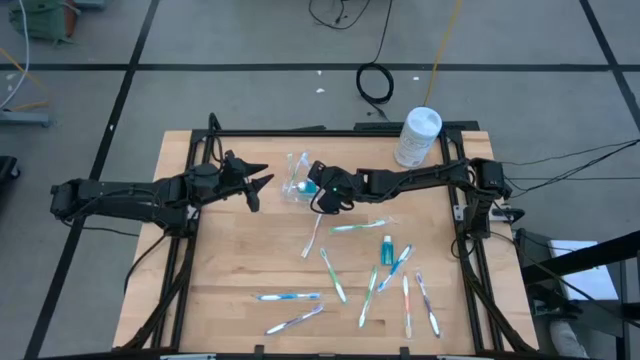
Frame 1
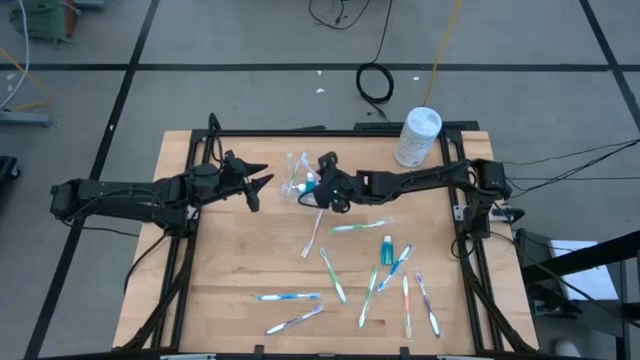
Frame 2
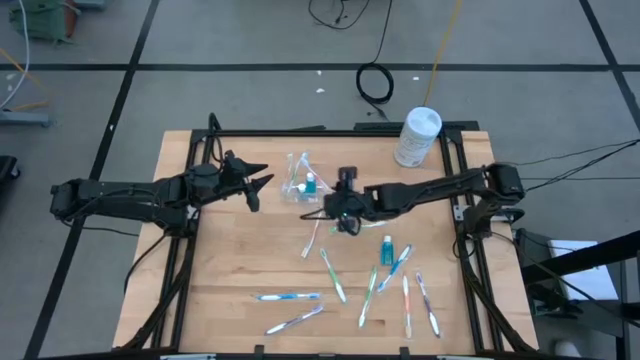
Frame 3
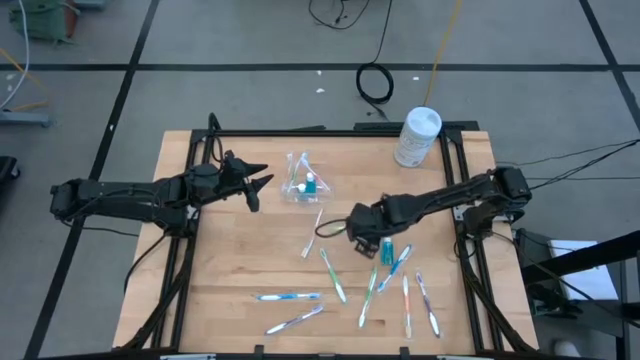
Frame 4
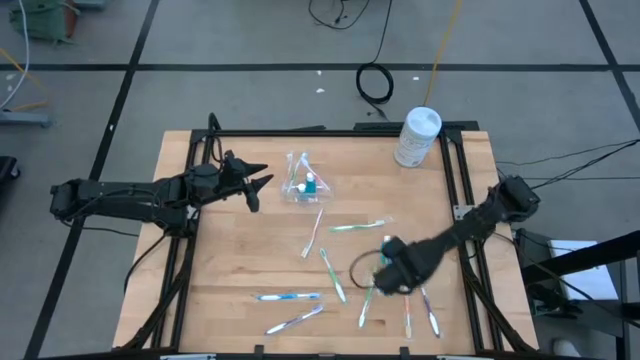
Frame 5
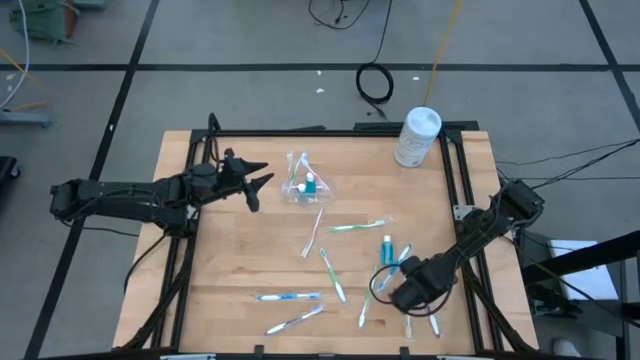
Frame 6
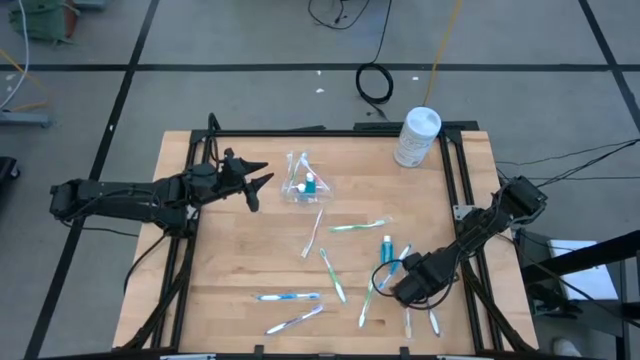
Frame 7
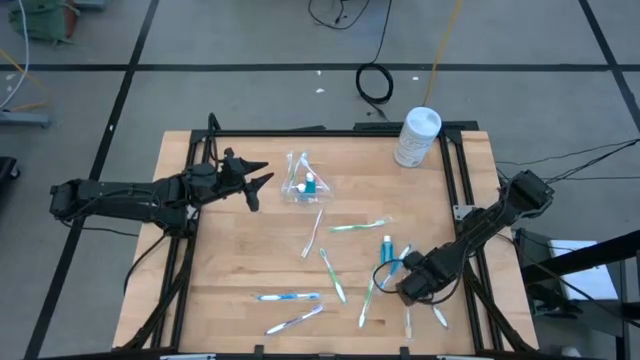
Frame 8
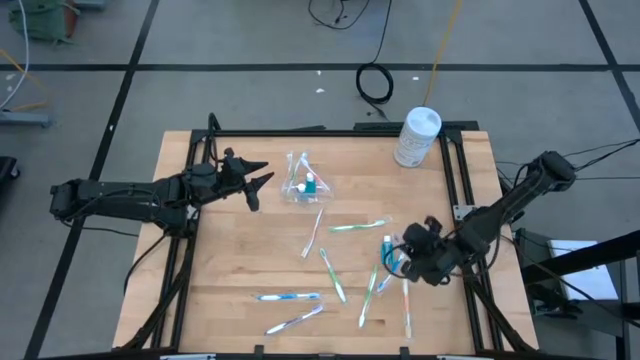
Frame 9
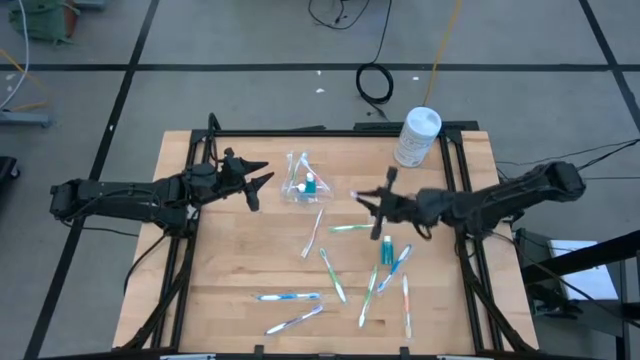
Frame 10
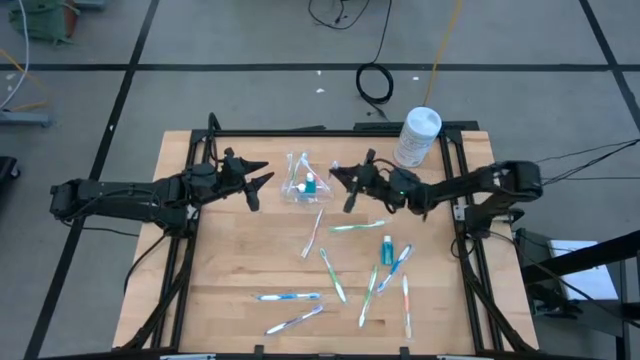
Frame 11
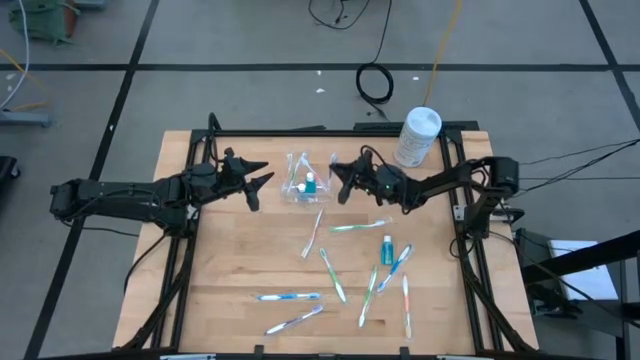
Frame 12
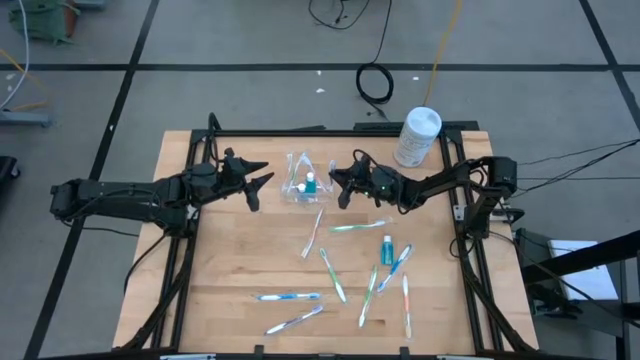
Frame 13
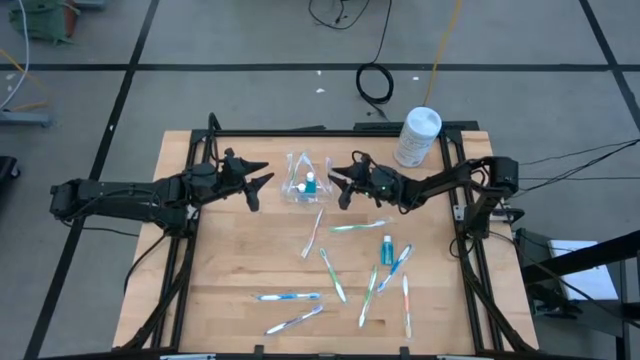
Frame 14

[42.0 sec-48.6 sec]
Task: Pick & Place toothbrushing station
Put the purple toothbrush into the transparent organizer

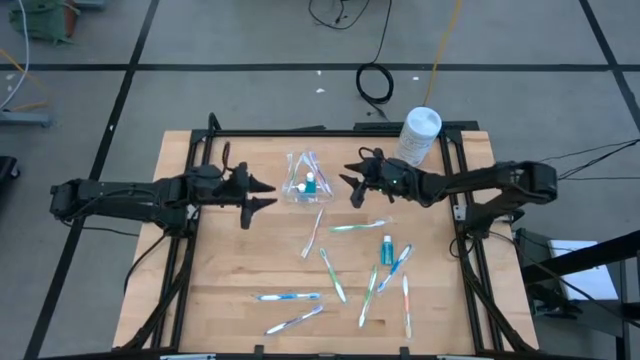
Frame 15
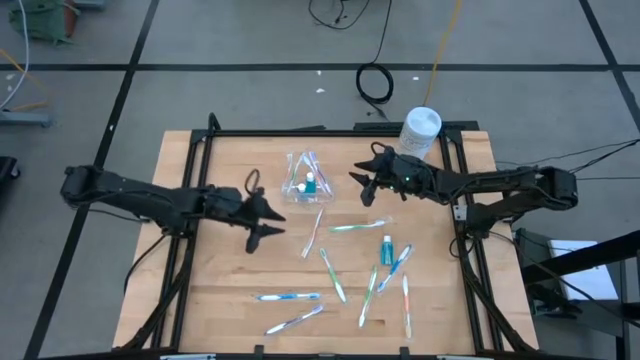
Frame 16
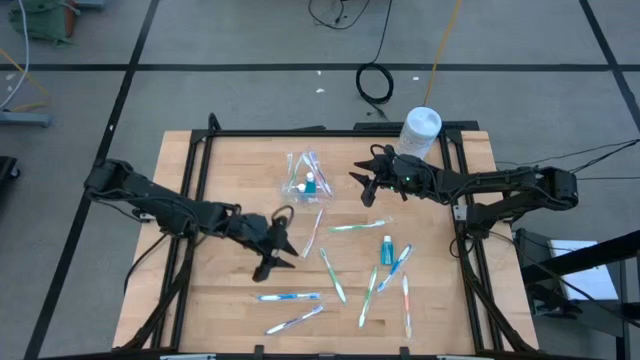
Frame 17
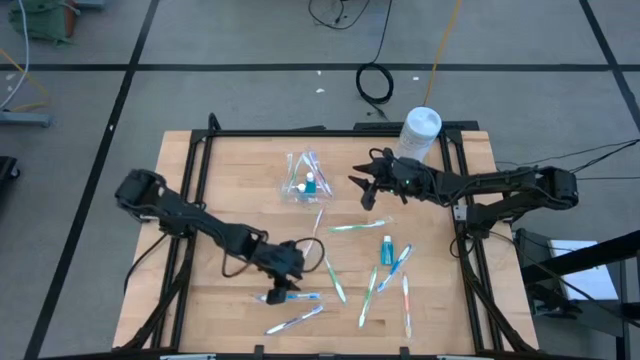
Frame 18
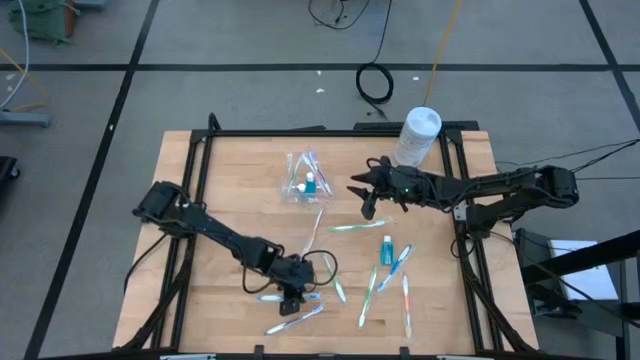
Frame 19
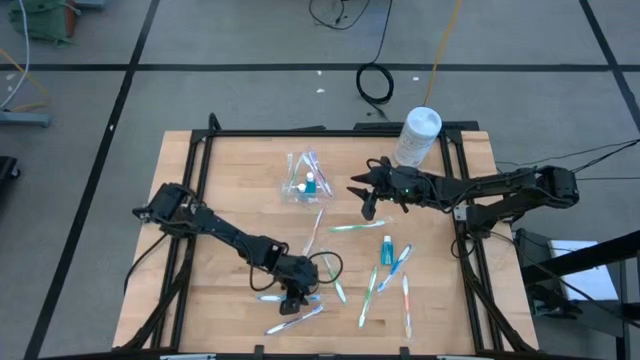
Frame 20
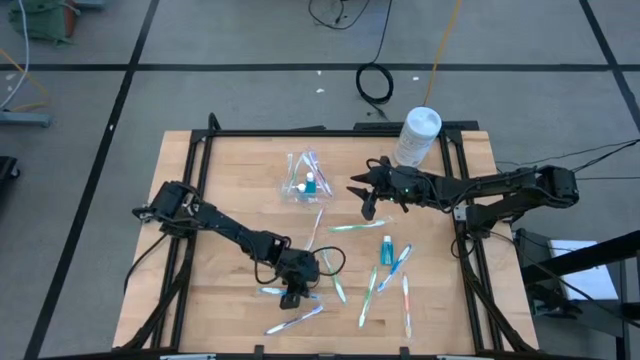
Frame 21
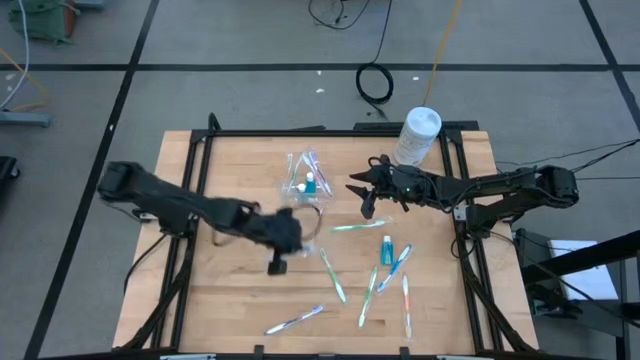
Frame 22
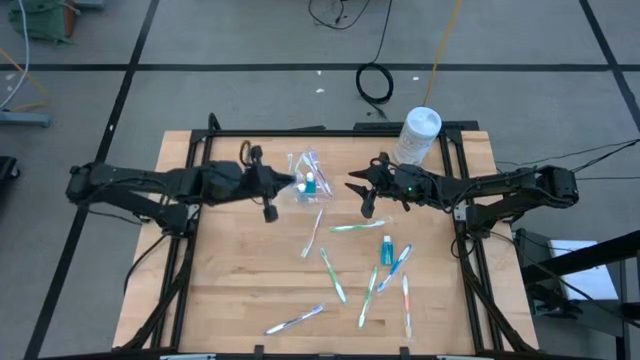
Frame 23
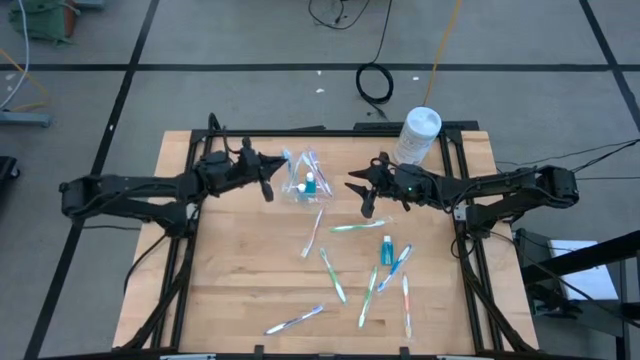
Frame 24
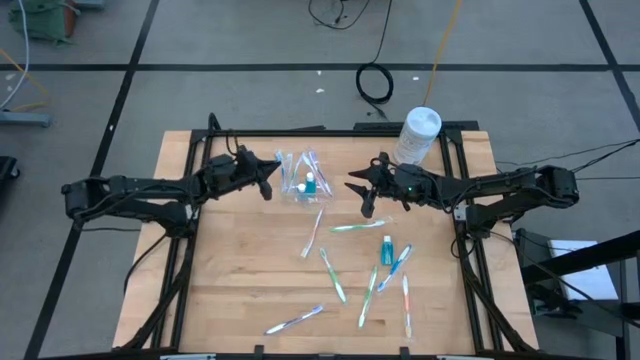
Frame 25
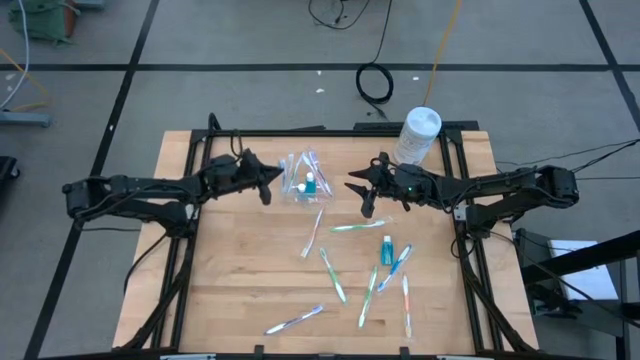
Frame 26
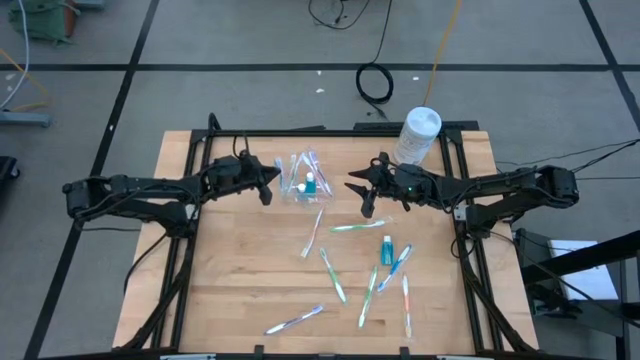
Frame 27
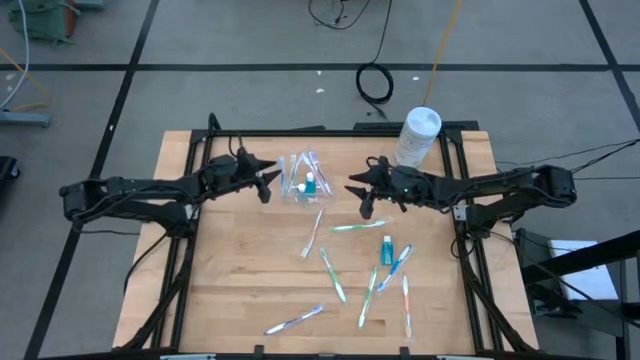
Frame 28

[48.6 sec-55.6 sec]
Put the blue toothbrush into the transparent organizer

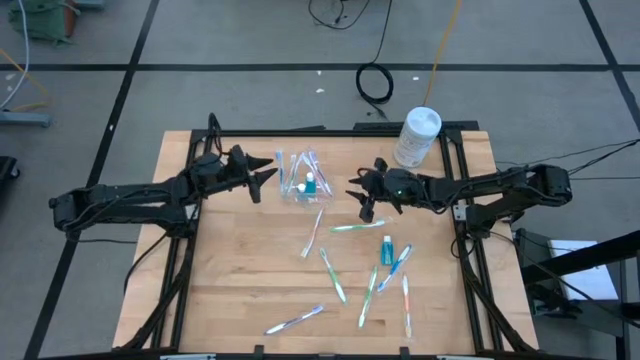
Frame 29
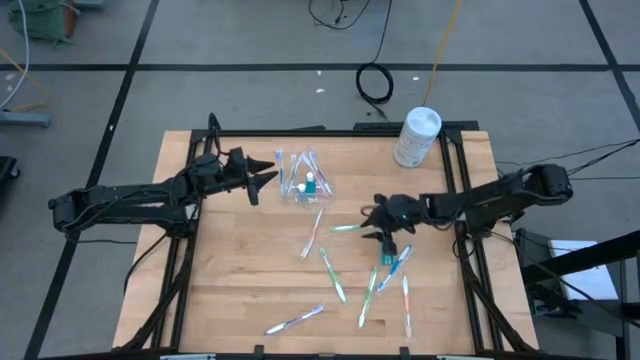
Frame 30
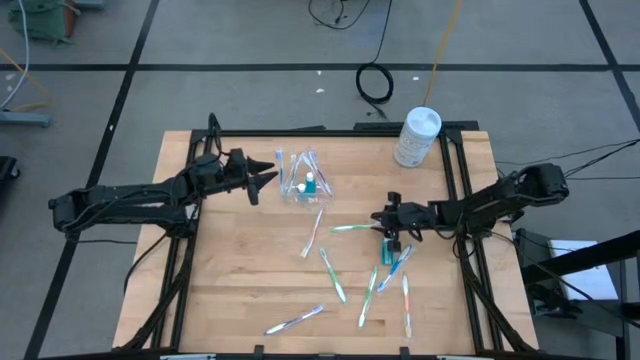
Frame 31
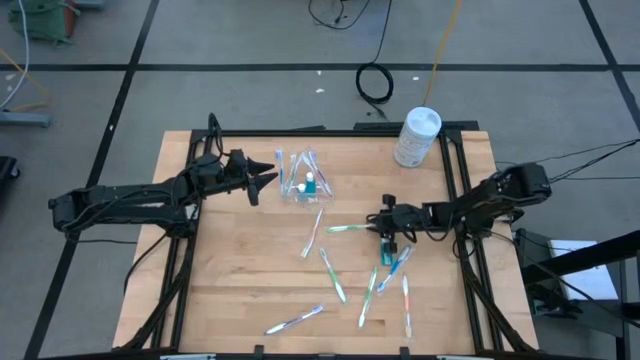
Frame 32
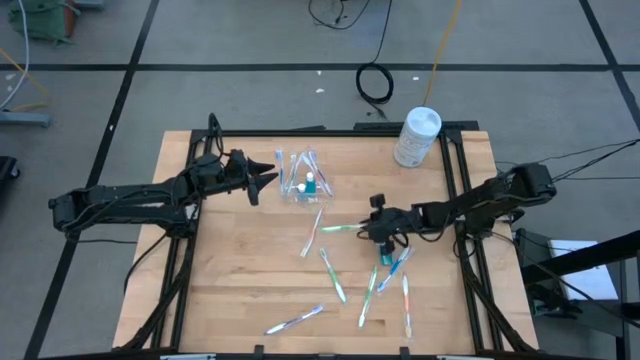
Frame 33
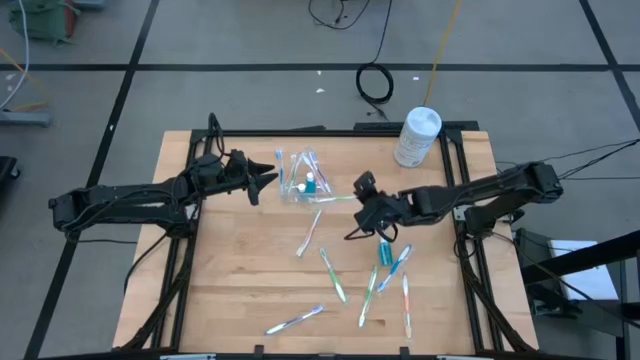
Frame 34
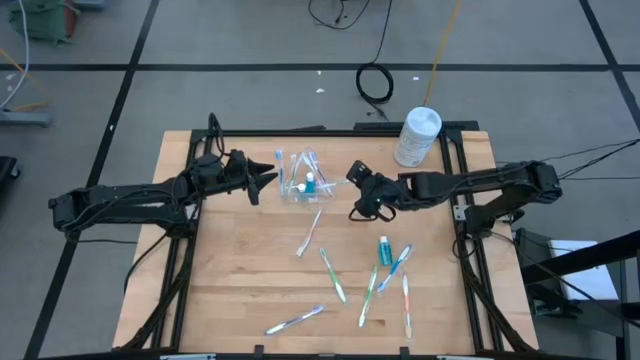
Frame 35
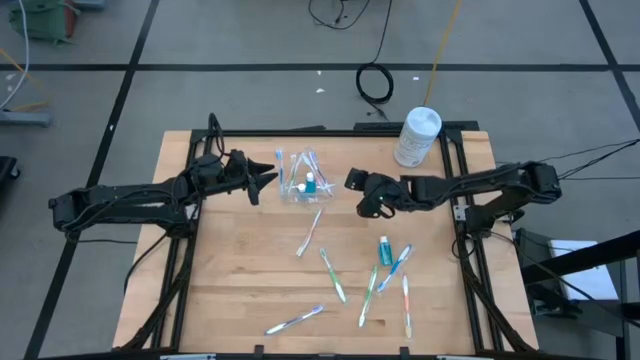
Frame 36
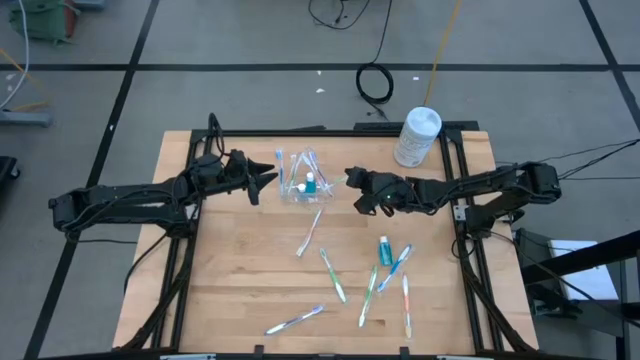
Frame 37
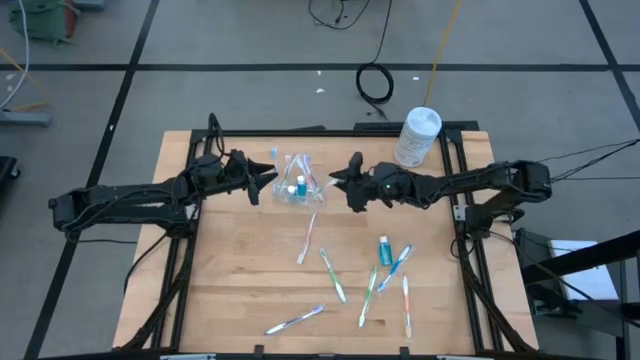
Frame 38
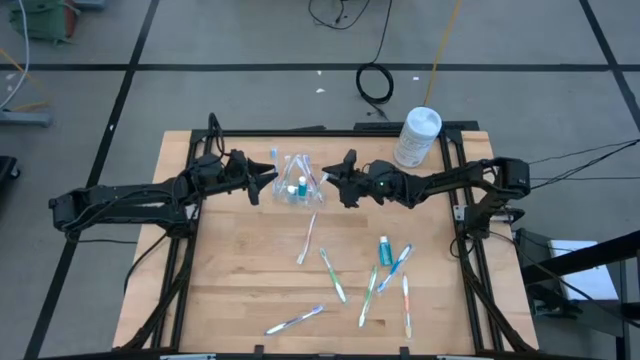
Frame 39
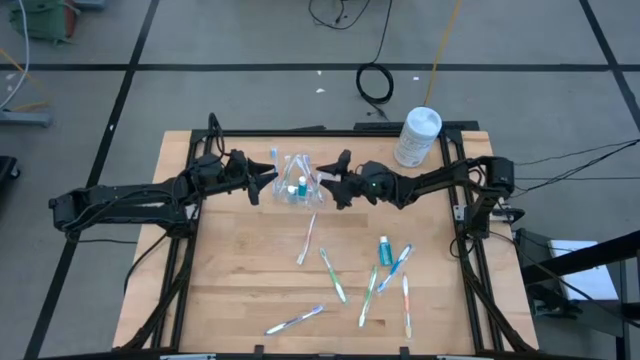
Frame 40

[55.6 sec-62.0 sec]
Put the green toothbrush into the transparent organizer

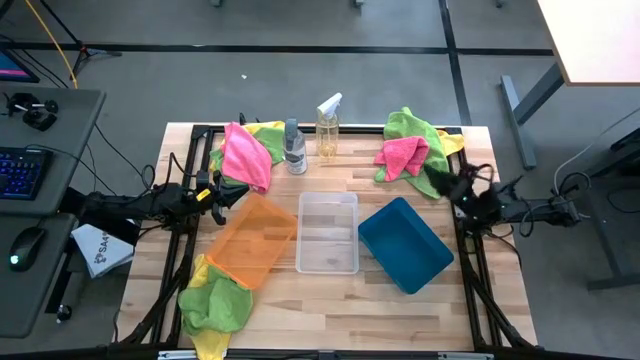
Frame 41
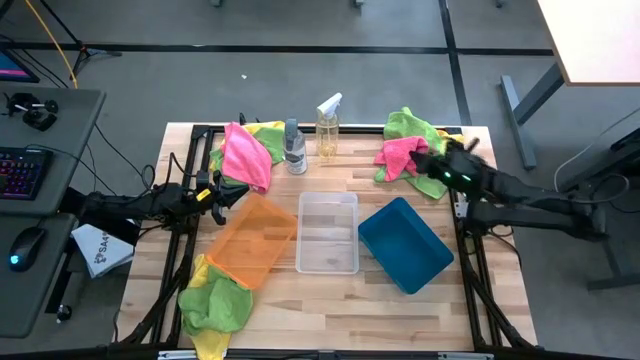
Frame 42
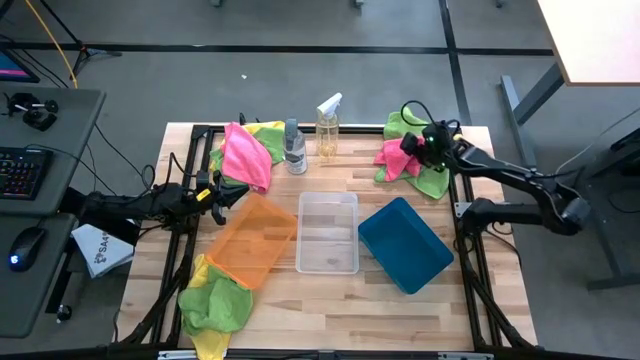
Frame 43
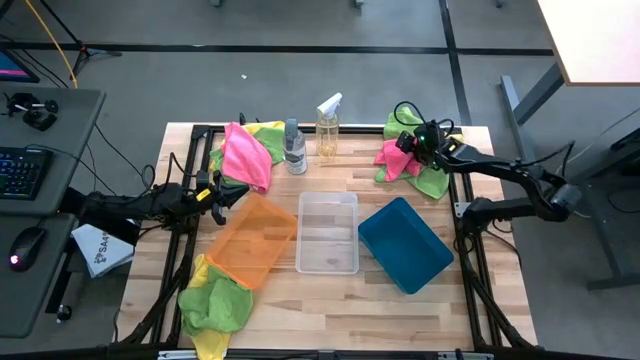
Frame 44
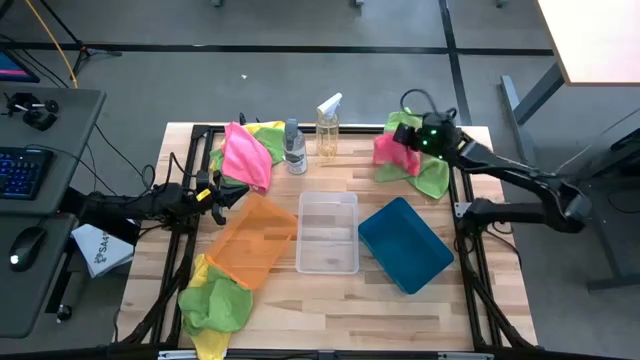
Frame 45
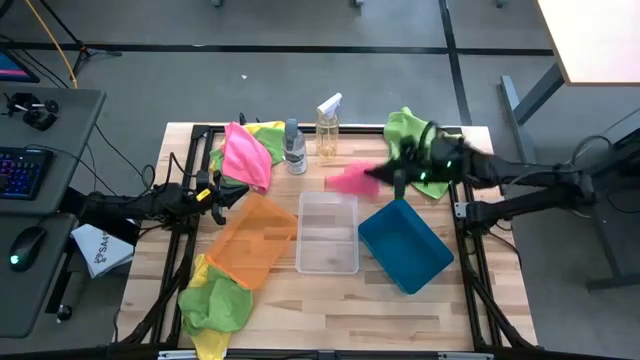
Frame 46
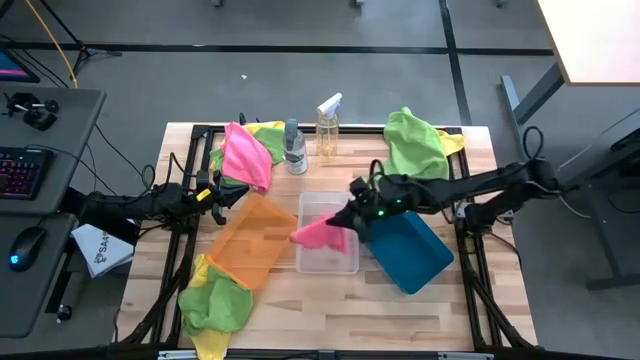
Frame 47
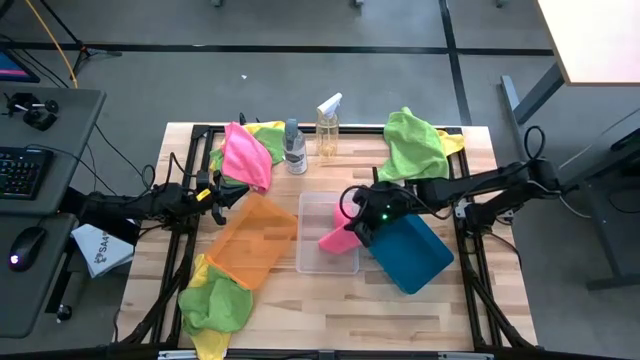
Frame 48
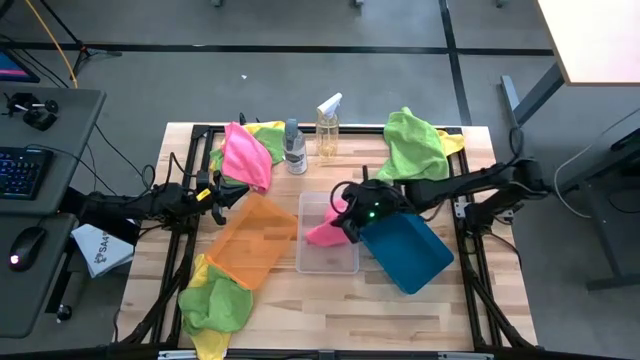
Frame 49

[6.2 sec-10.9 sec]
Task: Sort microfiber towel by color & place in baskets
Put the right pink microfiber towel into the white bin
